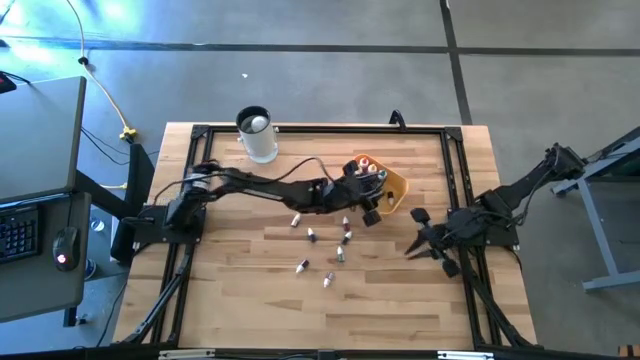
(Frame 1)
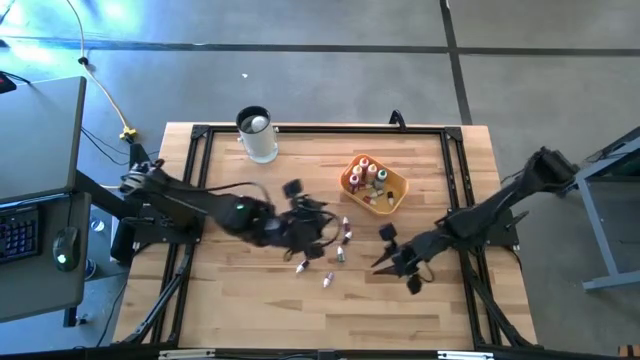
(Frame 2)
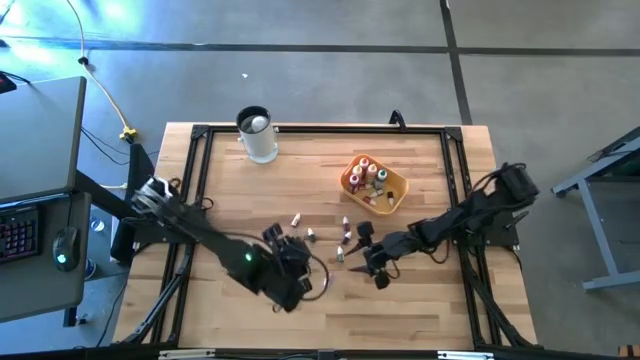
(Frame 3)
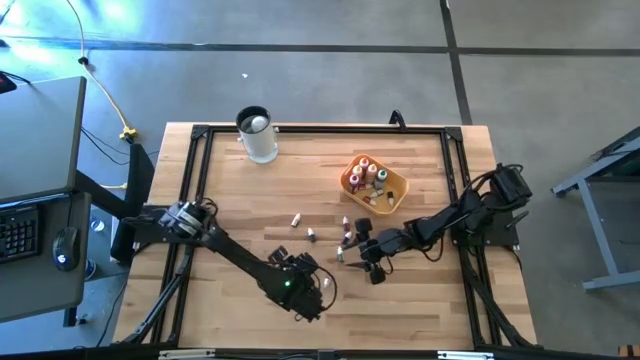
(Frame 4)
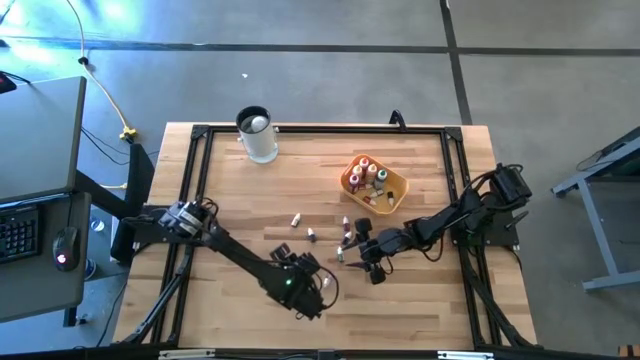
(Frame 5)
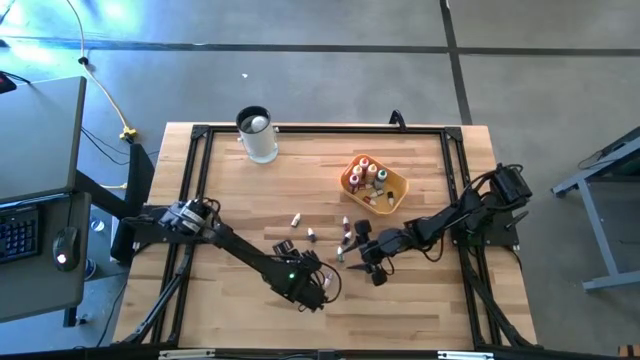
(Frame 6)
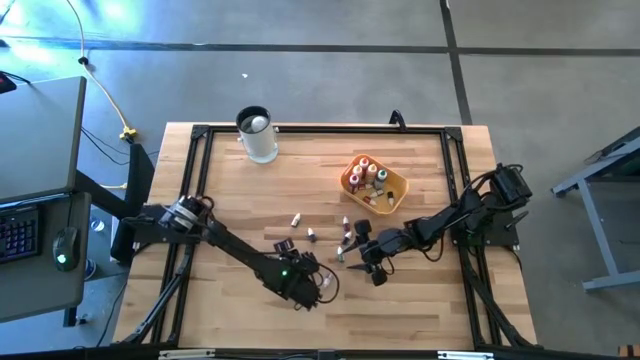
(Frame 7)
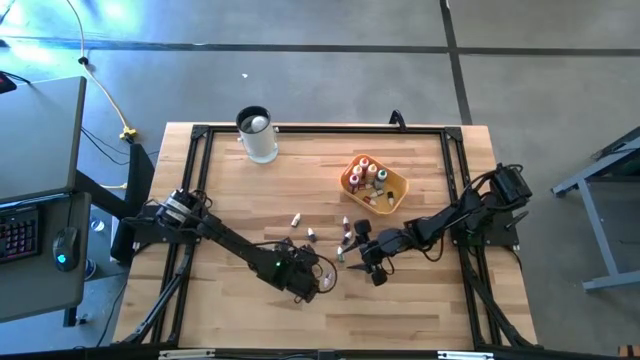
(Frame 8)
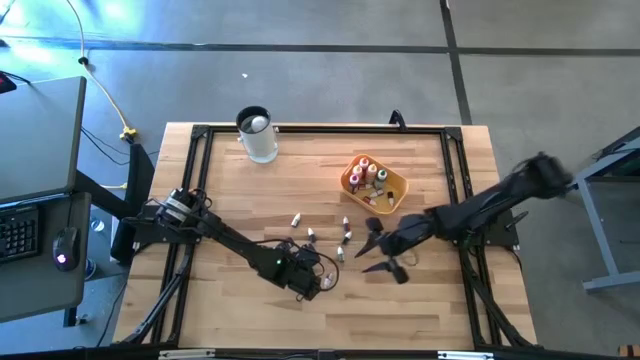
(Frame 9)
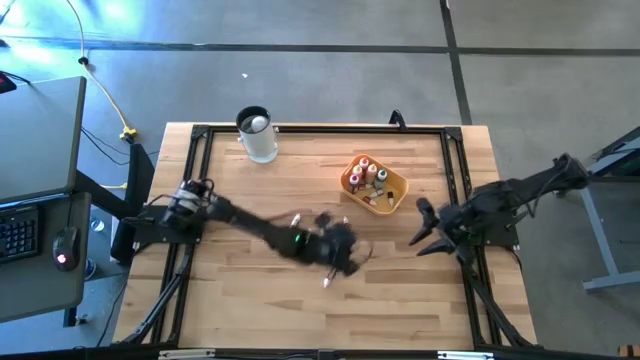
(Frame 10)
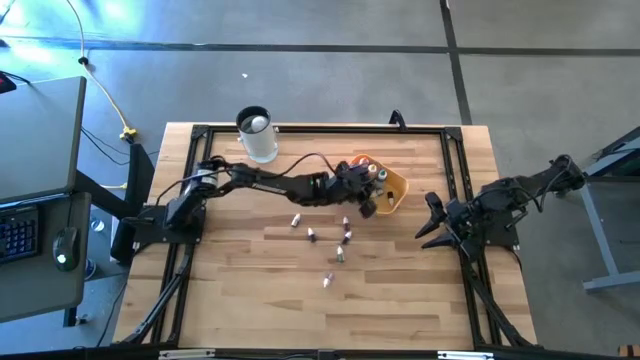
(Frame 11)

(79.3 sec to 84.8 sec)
Task: Pick & Place food coloring
Put the small green food coloring bottle into the yellow bin

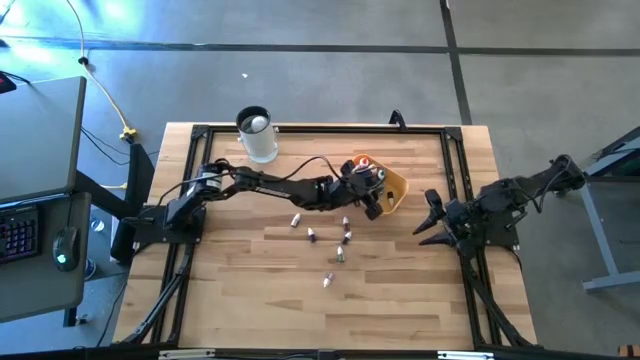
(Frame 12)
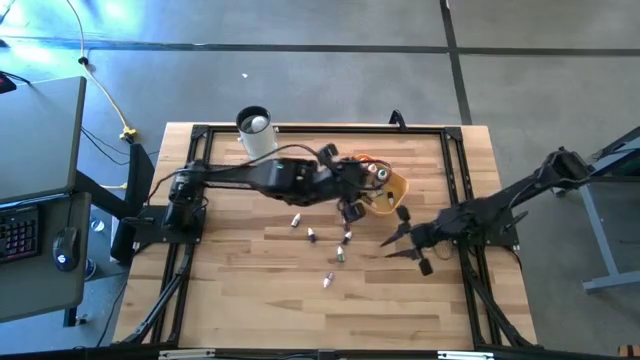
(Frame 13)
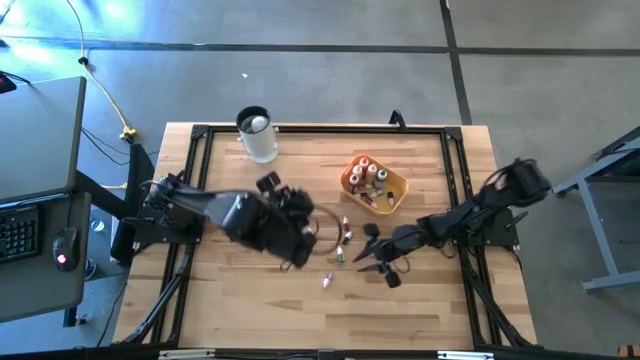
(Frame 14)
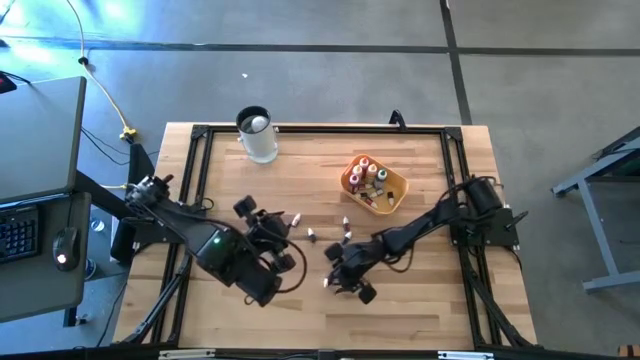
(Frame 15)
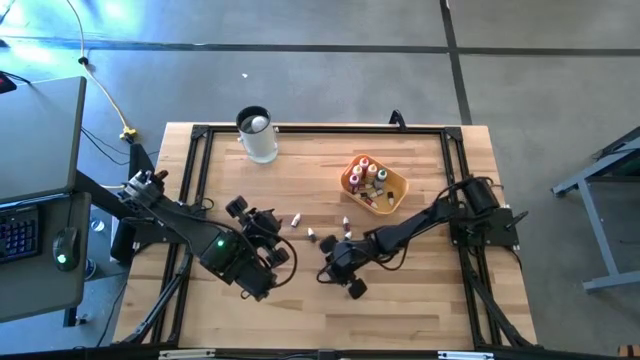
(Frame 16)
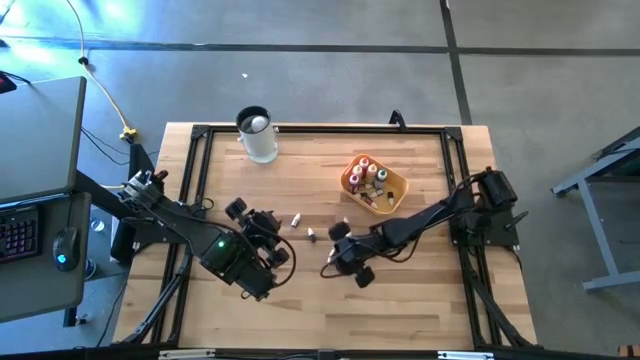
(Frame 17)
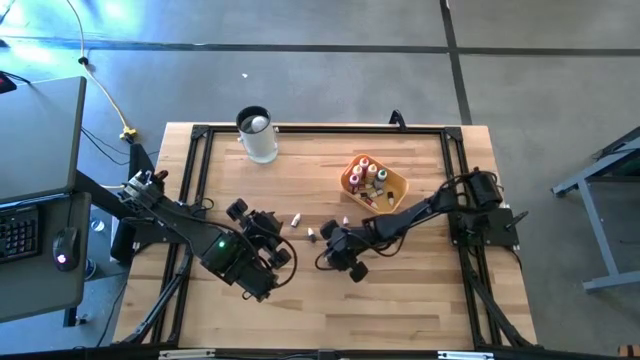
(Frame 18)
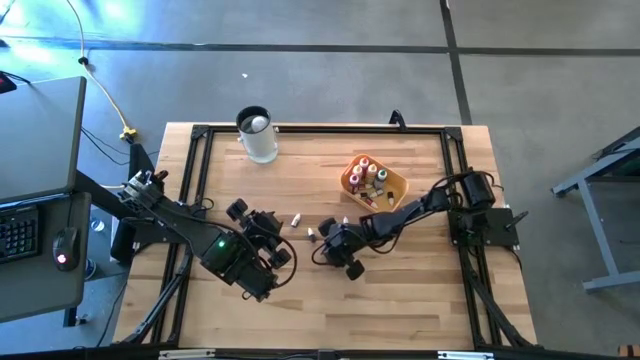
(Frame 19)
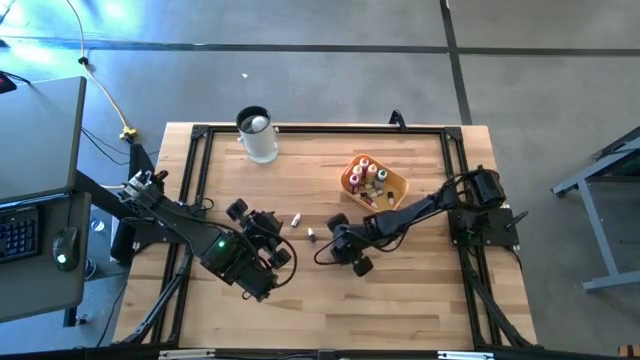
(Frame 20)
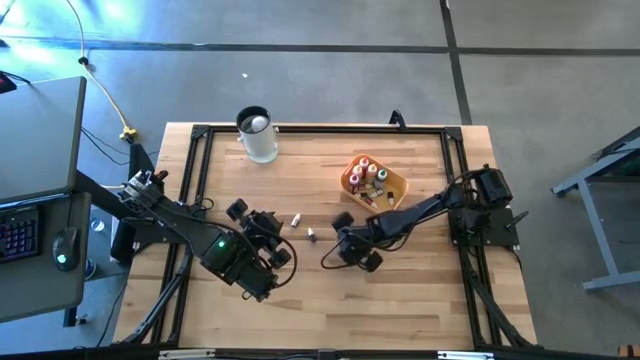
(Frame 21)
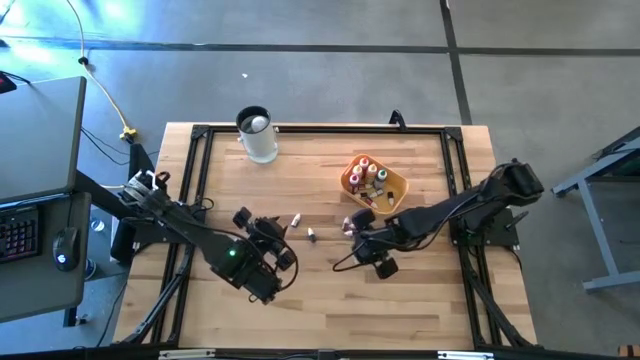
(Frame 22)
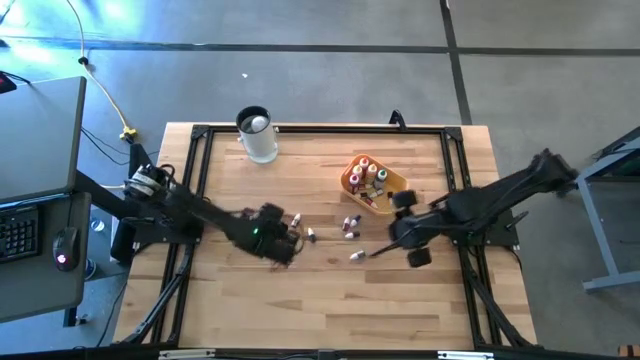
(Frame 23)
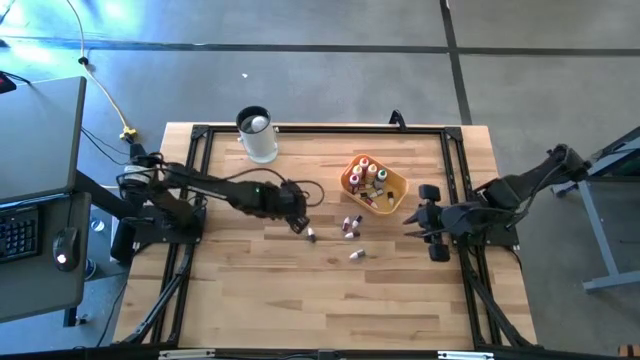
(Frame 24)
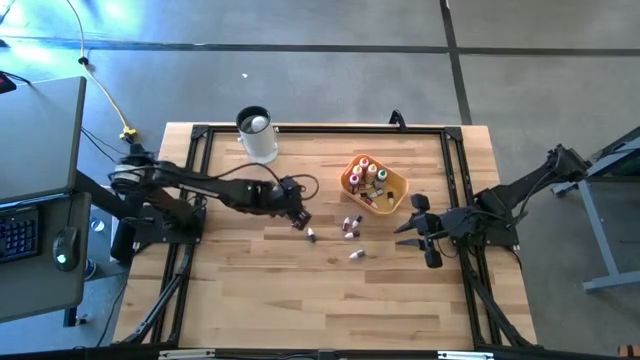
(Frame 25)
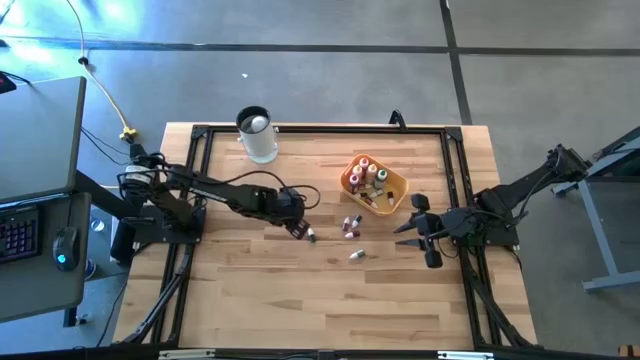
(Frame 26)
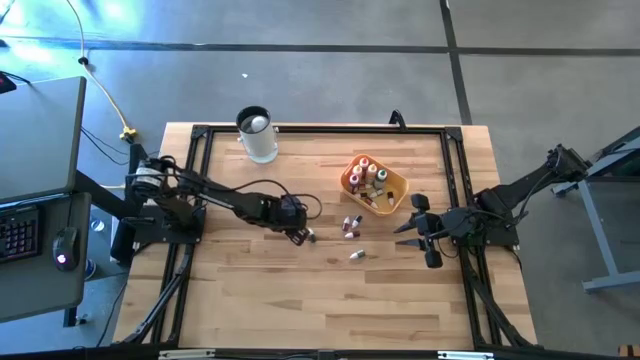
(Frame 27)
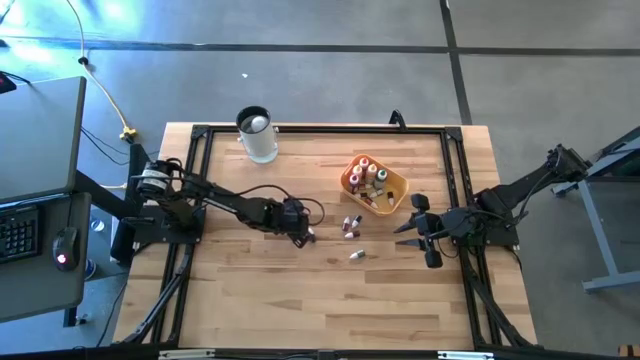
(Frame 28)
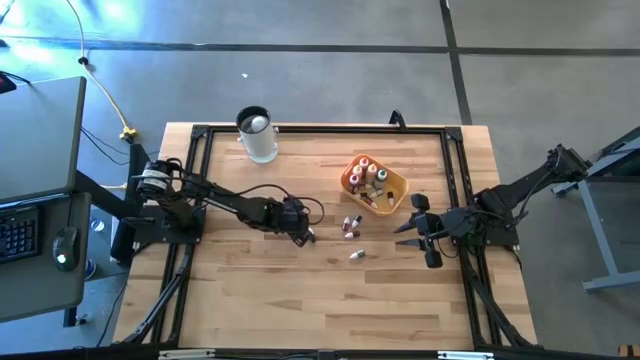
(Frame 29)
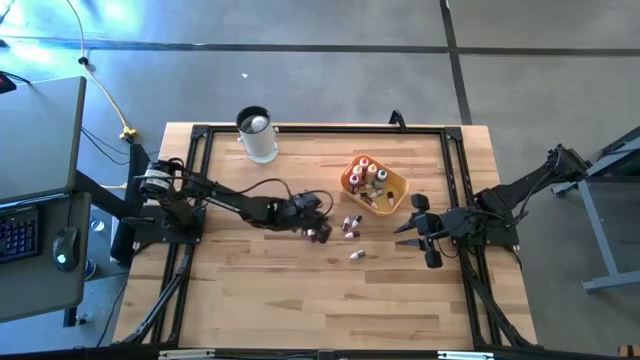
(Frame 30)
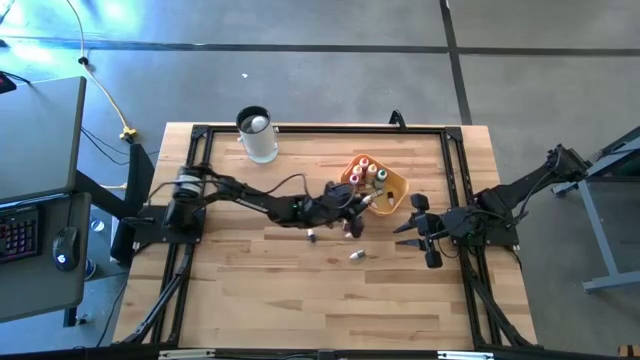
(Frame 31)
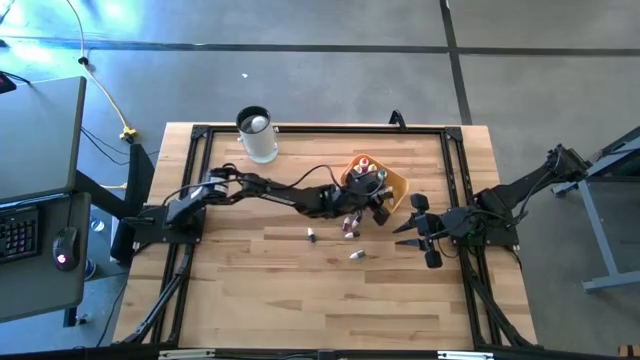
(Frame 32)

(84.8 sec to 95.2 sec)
Put the small violet food coloring bottle into the yellow bin

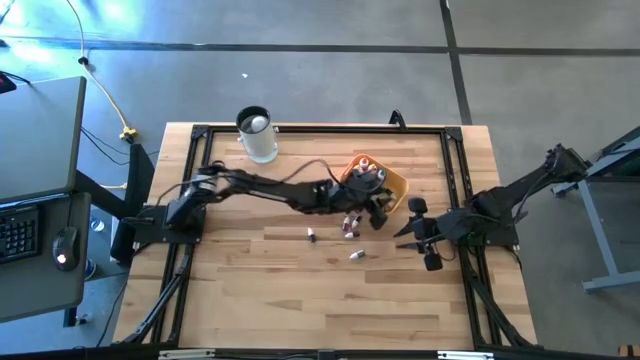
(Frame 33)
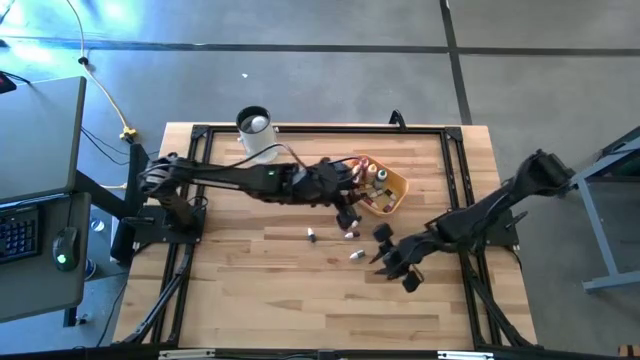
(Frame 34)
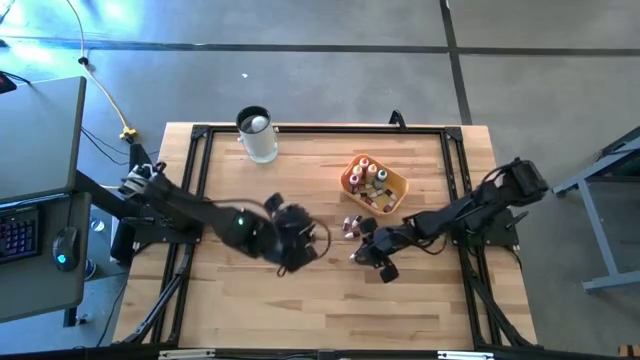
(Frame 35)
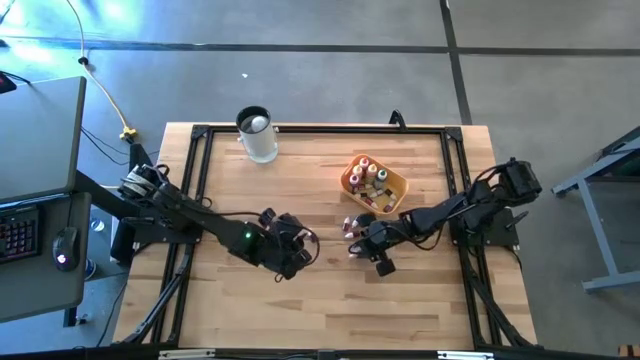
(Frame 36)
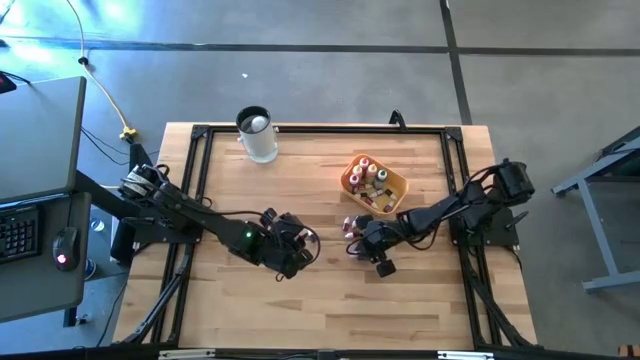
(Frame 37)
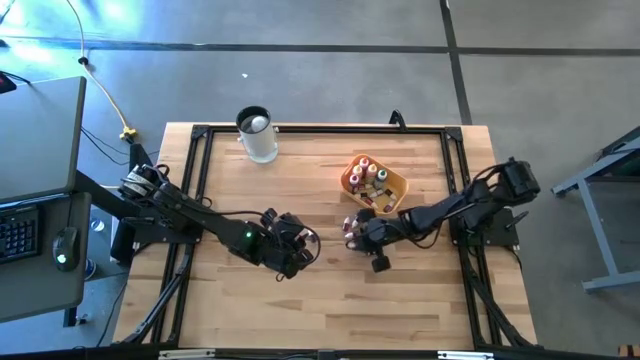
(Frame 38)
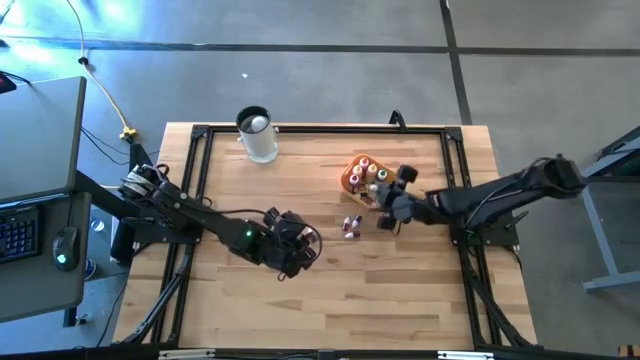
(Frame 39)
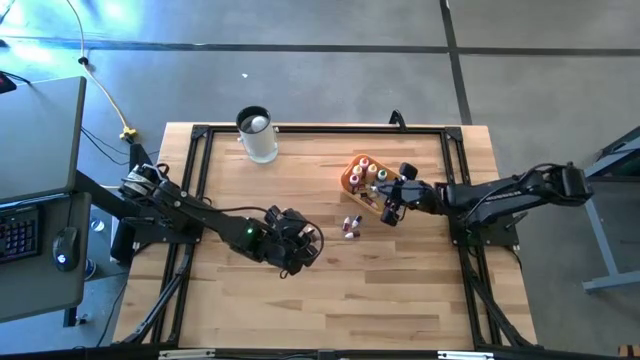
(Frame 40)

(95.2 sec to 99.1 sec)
Put the small green food coloring bottle into the yellow bin

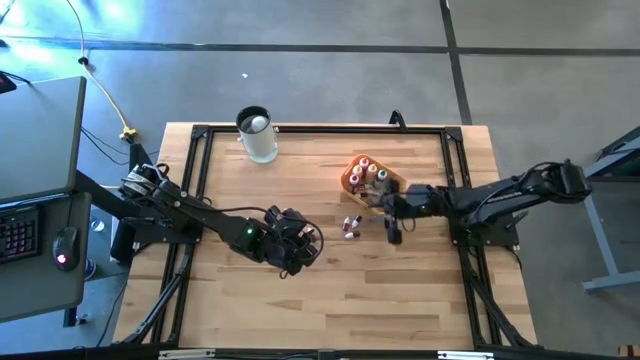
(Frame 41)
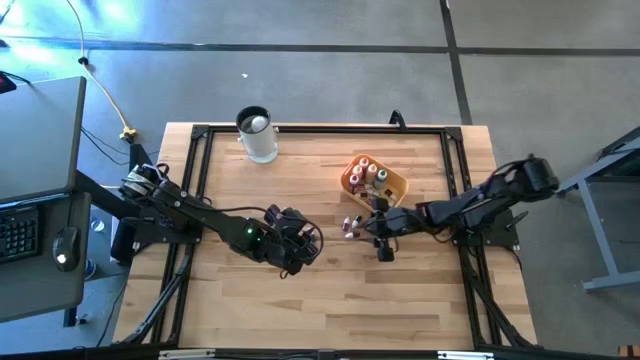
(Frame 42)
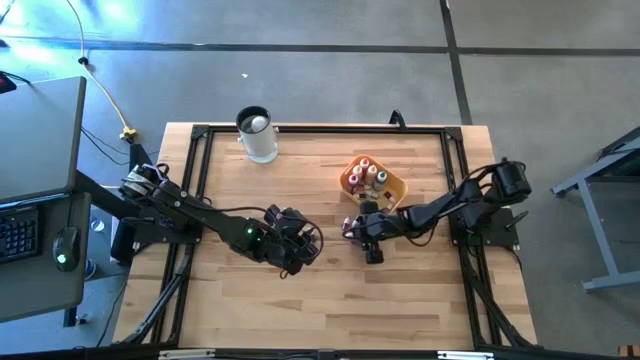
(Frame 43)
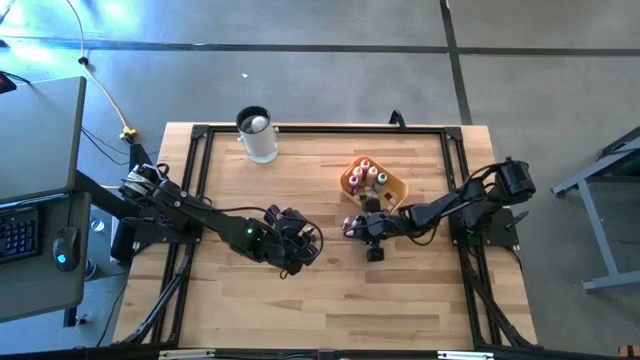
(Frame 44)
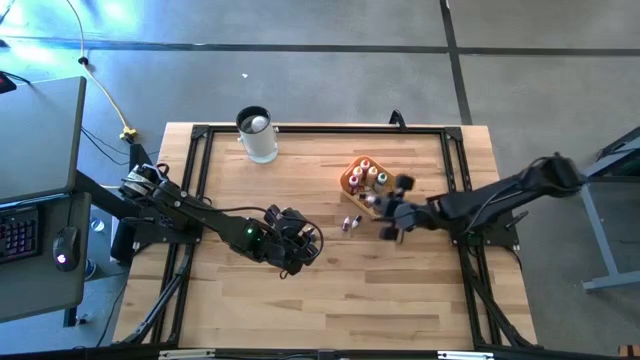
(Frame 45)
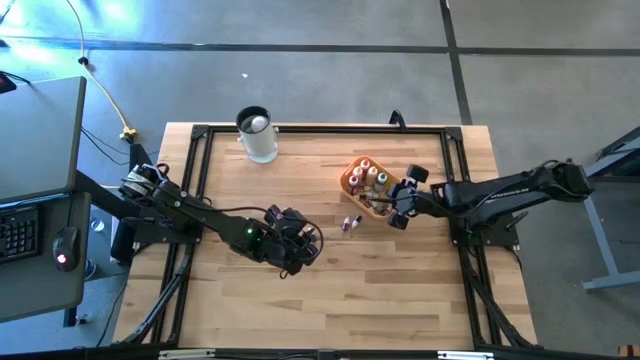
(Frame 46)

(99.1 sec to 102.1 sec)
Put the small violet food coloring bottle into the yellow bin
